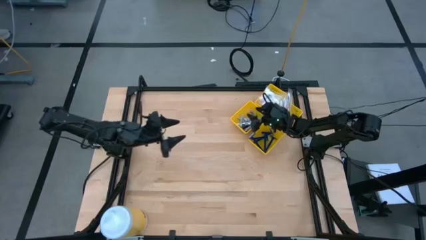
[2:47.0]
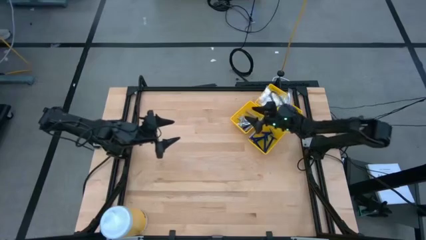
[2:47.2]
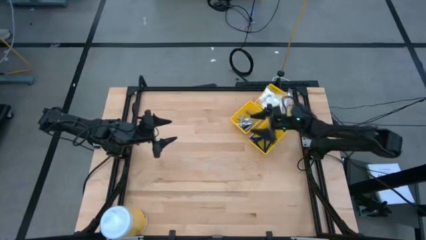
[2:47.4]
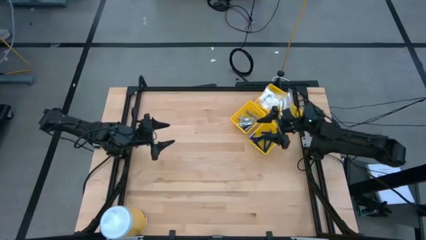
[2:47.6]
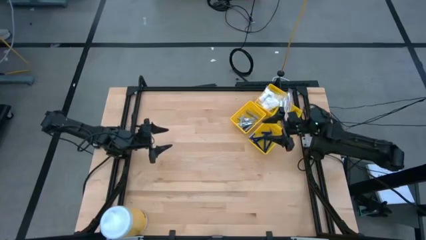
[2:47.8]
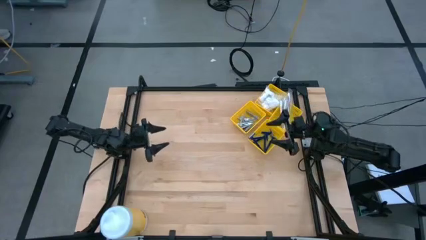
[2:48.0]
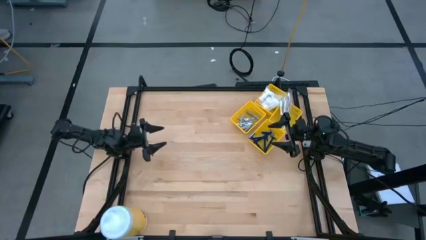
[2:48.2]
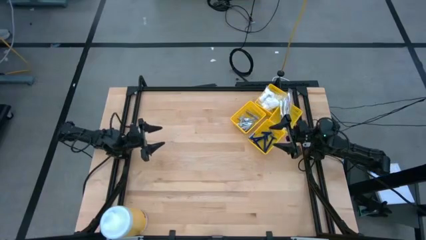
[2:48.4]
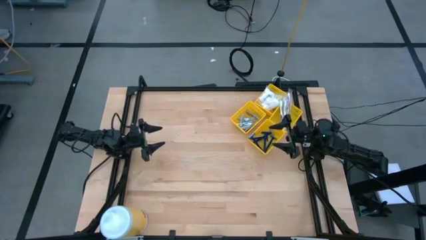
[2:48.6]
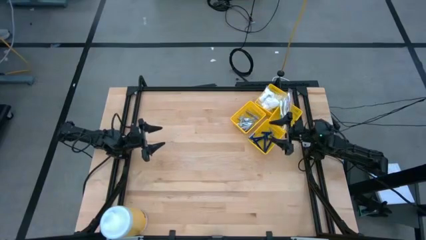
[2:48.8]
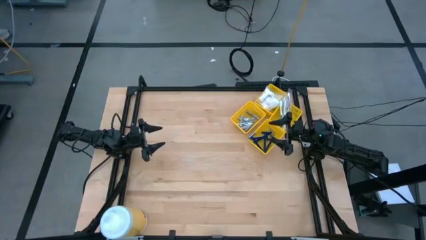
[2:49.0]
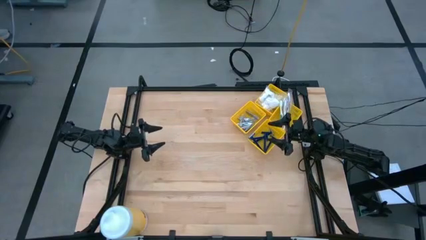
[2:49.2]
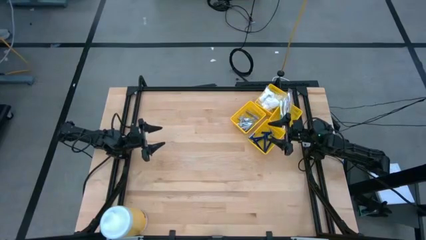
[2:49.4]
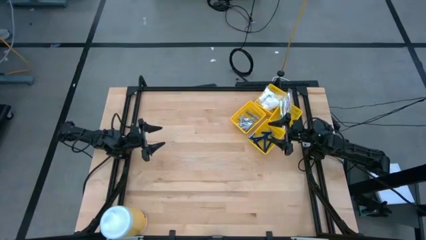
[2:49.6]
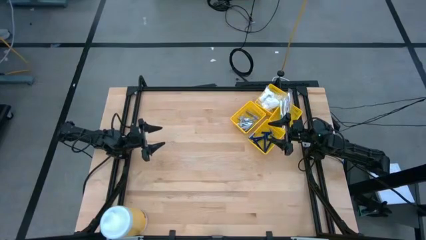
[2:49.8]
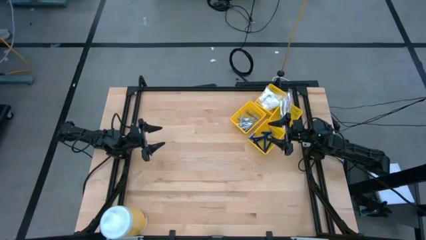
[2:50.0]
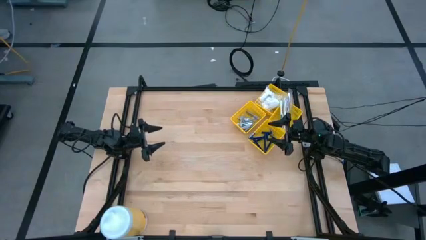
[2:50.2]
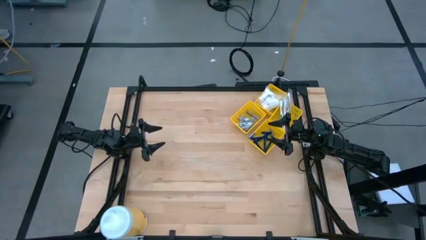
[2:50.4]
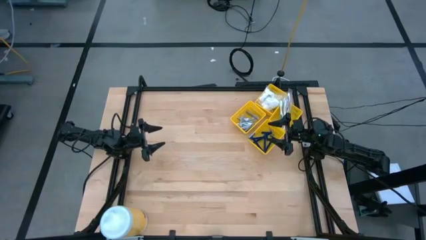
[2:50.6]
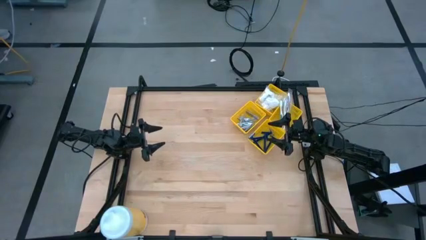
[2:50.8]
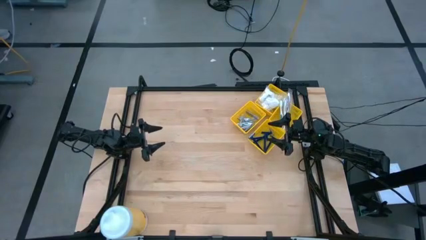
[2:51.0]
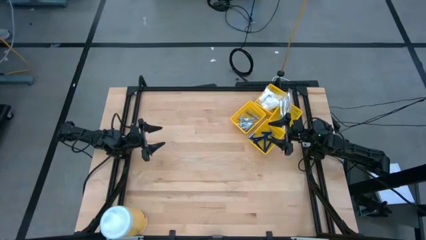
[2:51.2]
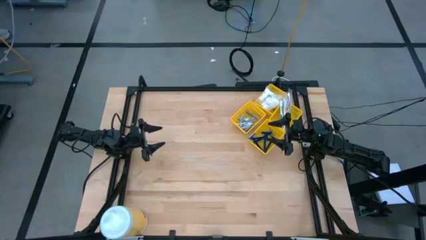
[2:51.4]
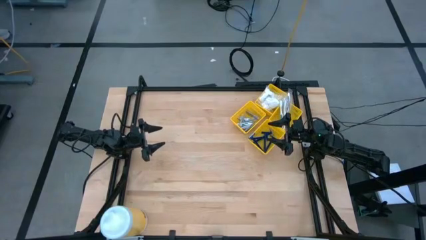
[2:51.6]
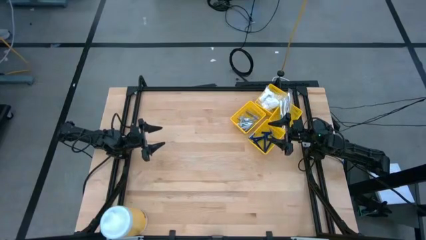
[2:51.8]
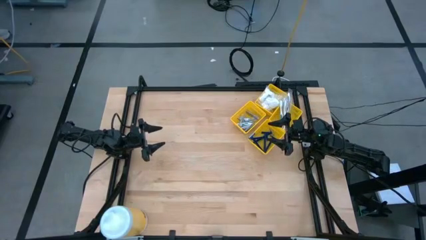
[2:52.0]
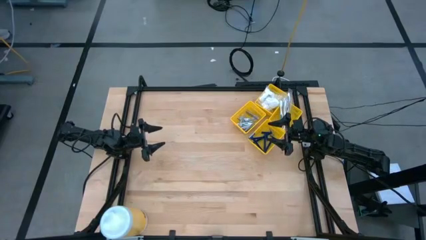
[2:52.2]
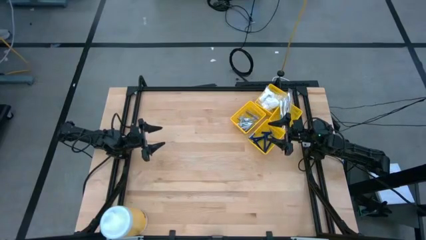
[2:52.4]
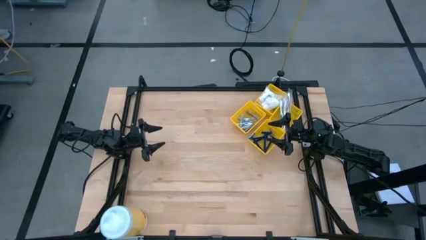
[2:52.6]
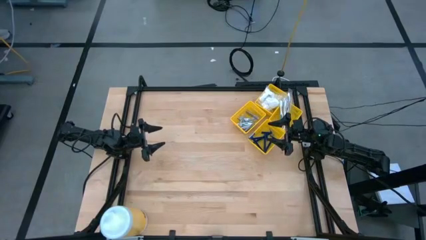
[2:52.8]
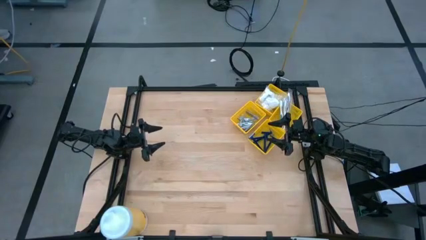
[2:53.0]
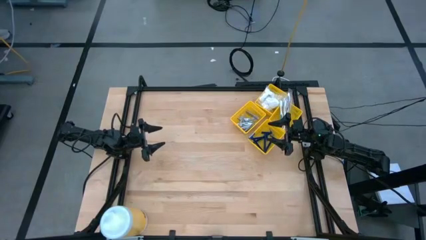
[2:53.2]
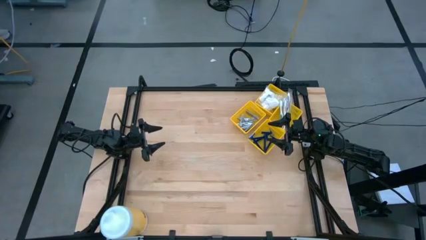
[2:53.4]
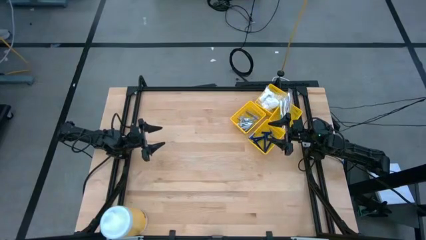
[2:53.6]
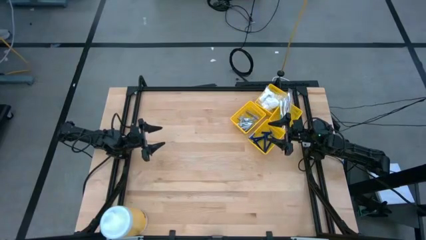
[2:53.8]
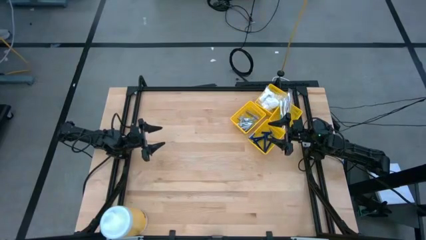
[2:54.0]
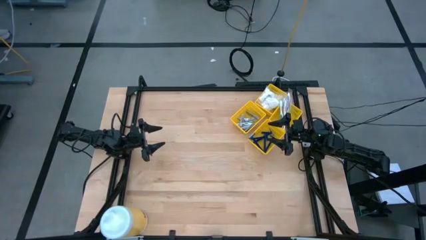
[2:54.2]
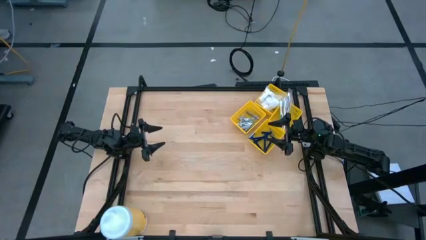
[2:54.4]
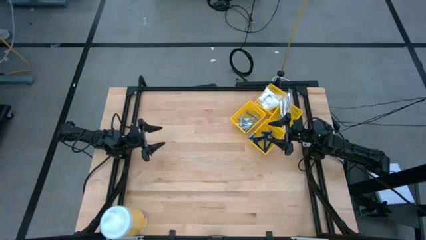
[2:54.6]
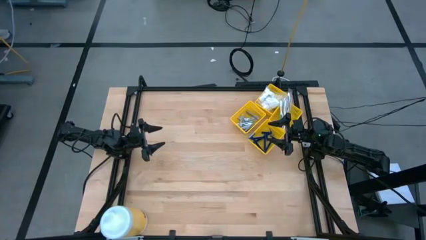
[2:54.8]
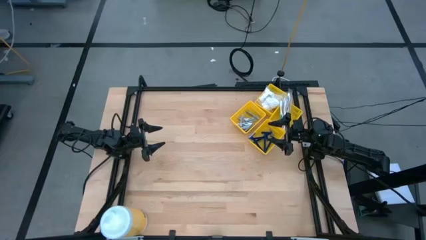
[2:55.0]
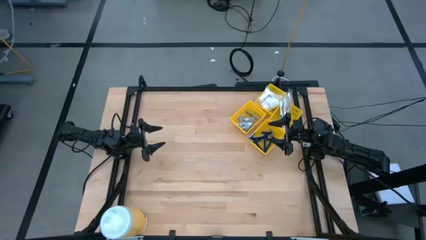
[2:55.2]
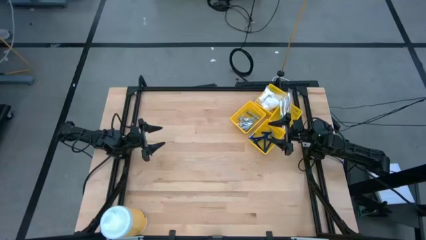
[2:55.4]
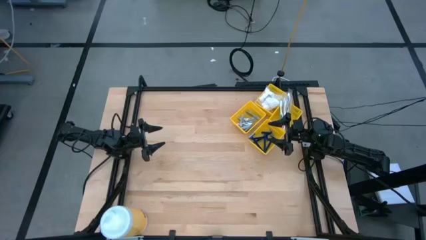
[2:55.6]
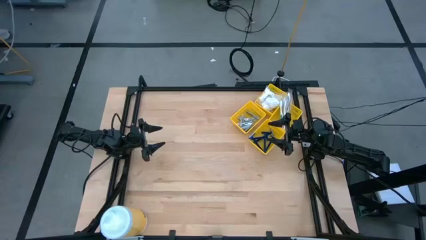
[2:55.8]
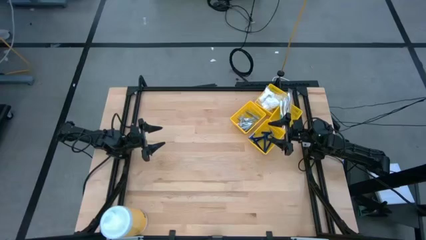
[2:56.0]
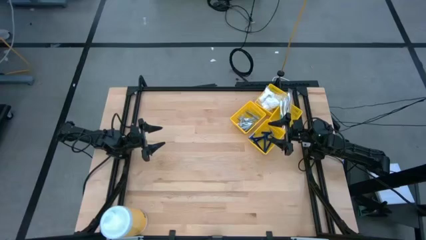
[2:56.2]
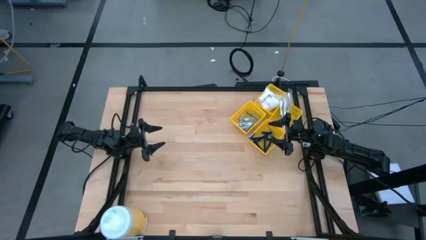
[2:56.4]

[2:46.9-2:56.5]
Task: Pick & Place Travel size toiletries
Return to Home Position

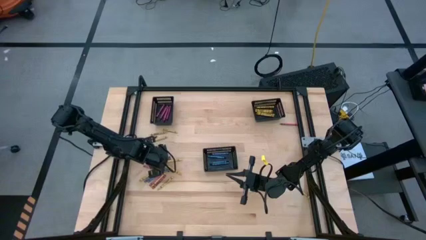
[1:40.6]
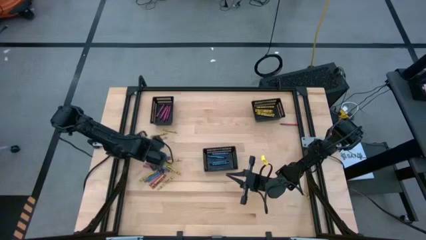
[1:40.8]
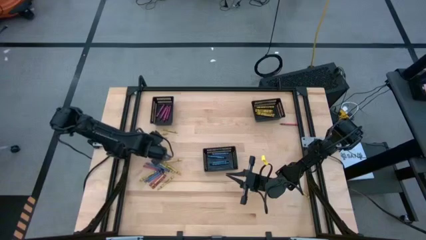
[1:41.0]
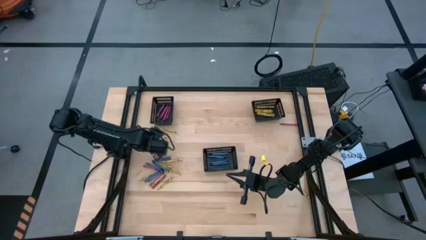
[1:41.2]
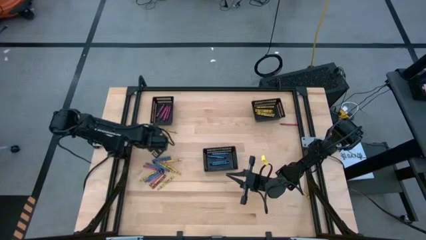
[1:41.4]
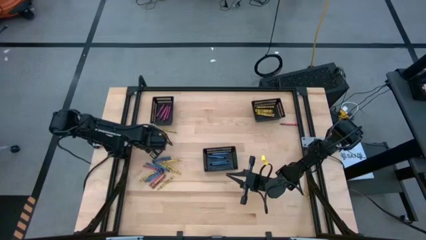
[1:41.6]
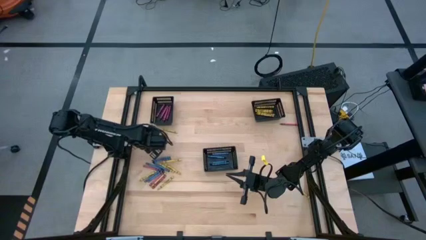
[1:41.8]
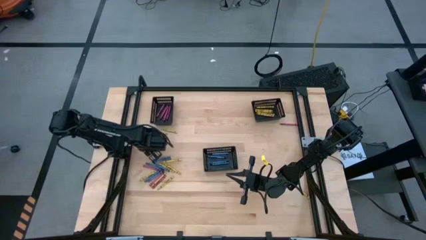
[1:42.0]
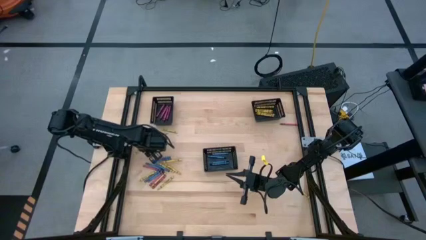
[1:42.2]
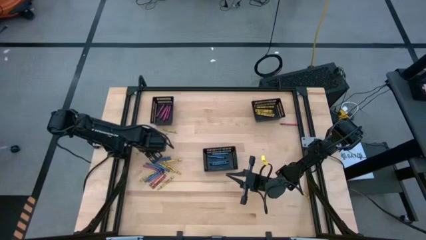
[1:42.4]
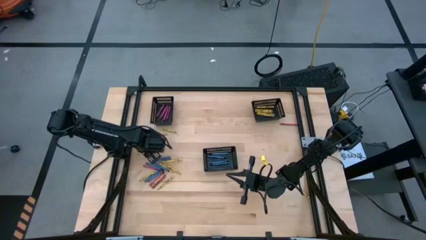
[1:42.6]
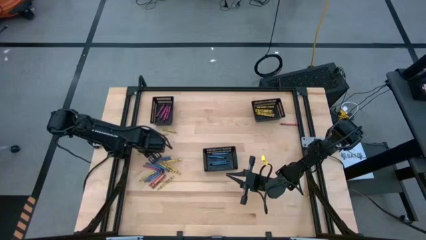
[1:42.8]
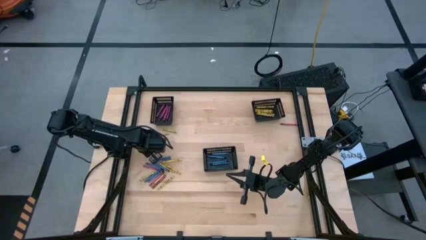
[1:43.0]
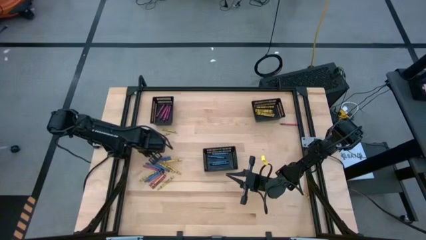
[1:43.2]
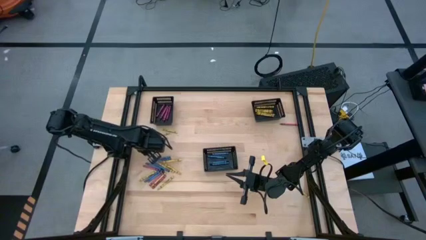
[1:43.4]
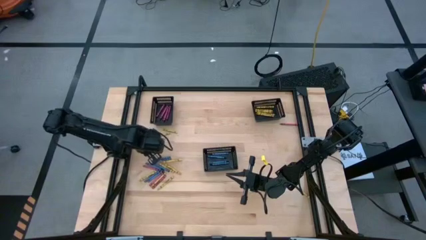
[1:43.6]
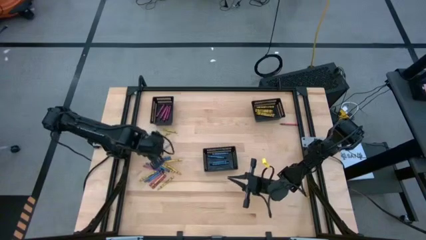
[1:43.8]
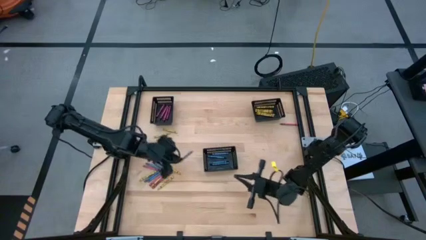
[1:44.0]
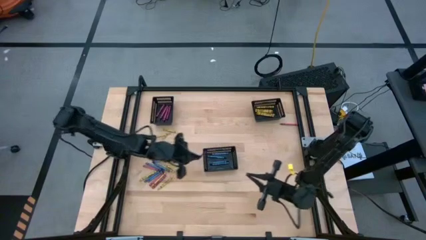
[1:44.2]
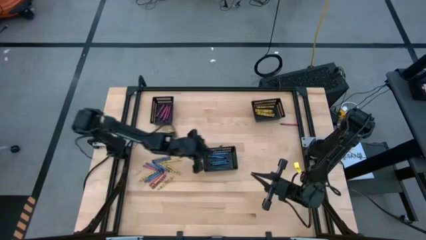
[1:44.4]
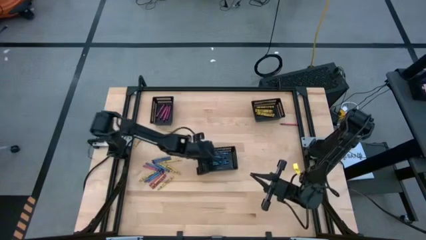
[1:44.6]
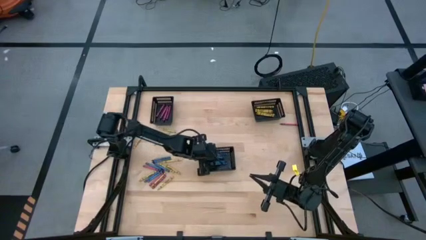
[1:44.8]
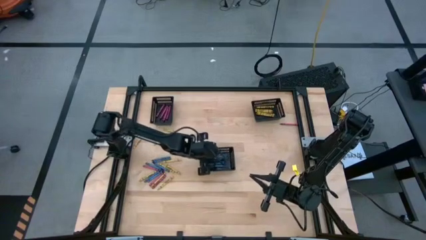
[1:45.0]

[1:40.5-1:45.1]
Task: Sort crayons
Put the blue crayon into the bottom black bin
